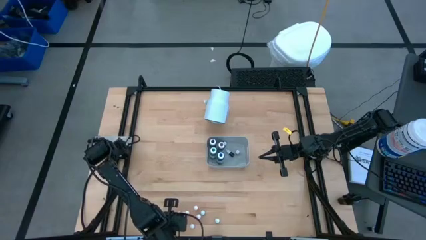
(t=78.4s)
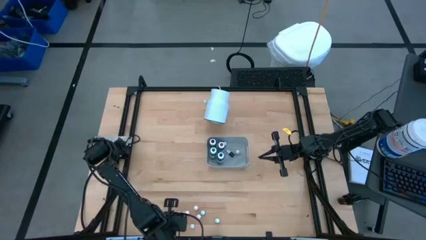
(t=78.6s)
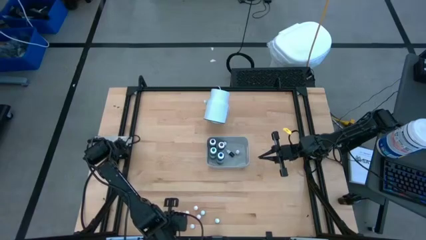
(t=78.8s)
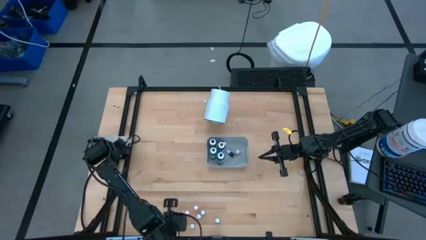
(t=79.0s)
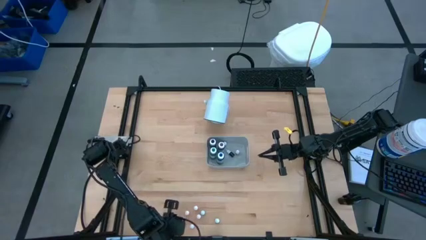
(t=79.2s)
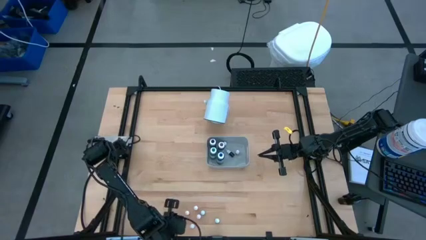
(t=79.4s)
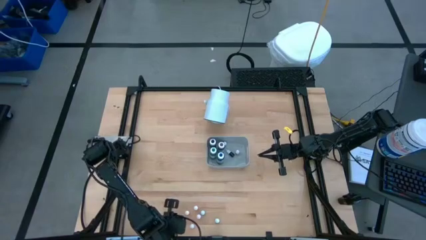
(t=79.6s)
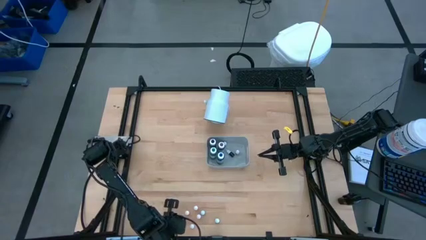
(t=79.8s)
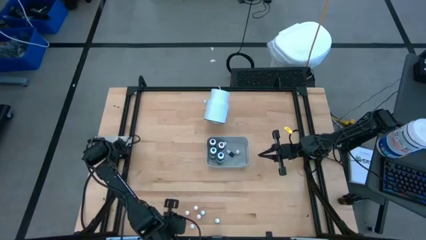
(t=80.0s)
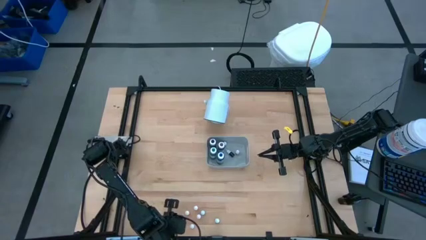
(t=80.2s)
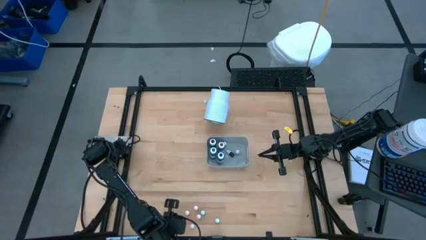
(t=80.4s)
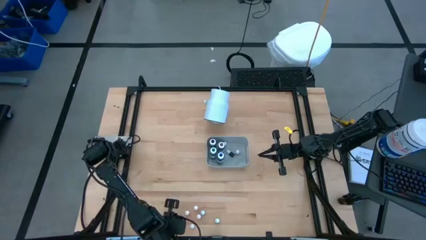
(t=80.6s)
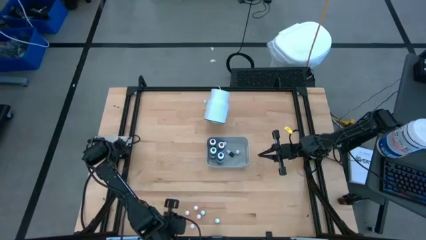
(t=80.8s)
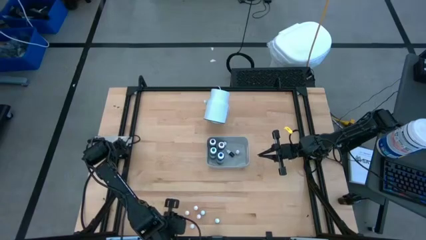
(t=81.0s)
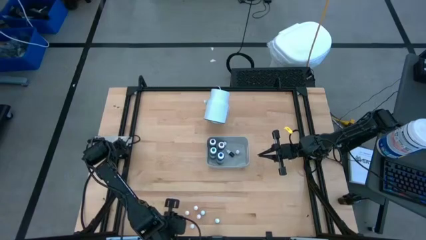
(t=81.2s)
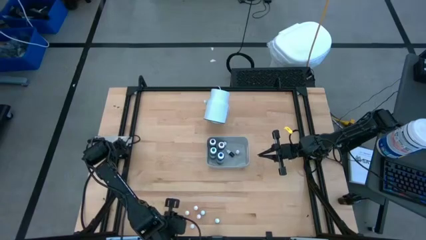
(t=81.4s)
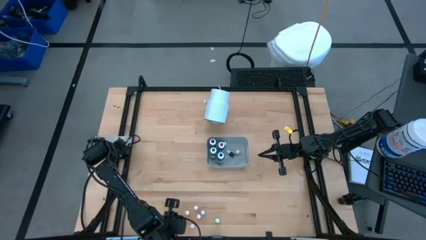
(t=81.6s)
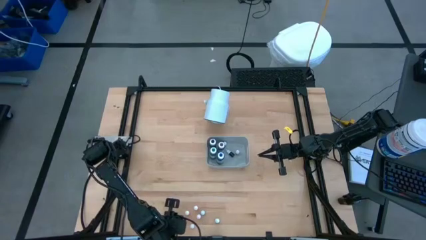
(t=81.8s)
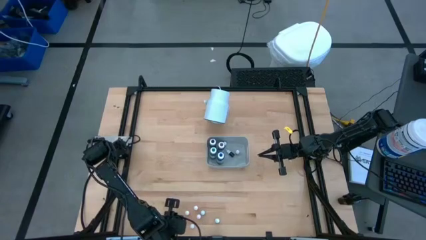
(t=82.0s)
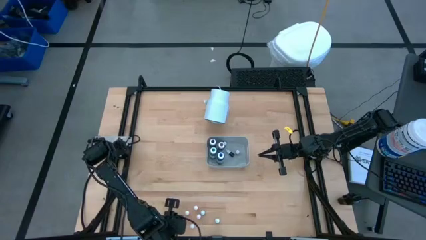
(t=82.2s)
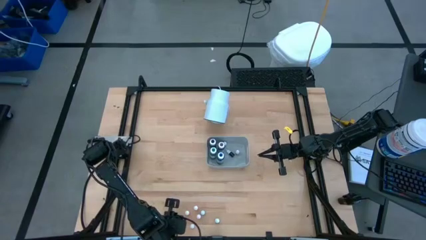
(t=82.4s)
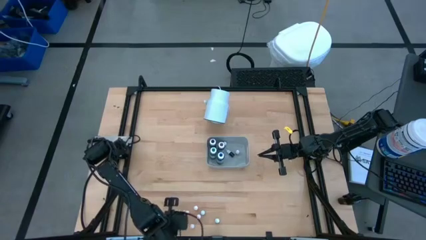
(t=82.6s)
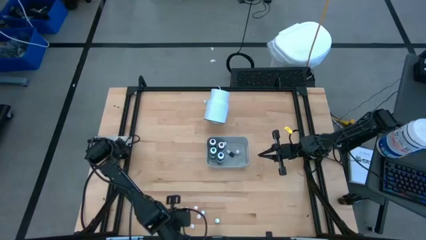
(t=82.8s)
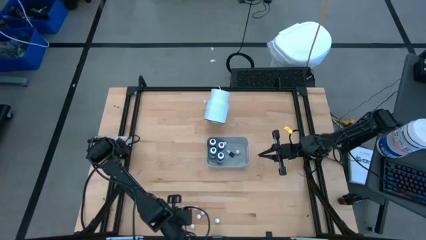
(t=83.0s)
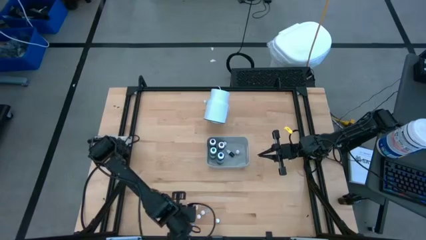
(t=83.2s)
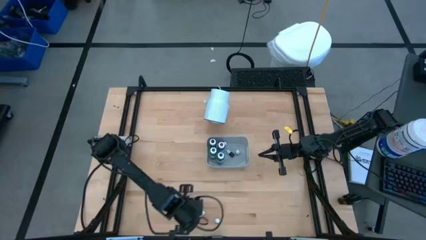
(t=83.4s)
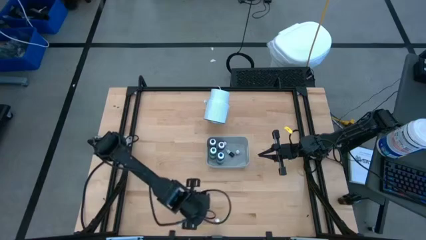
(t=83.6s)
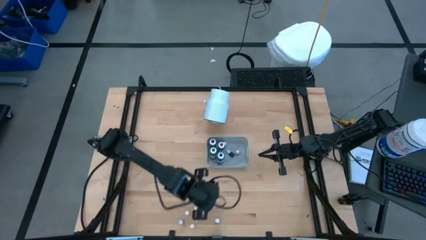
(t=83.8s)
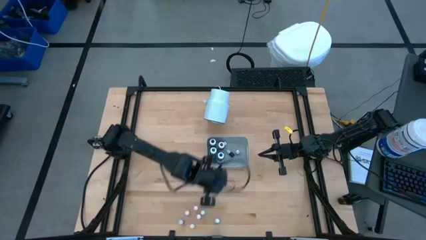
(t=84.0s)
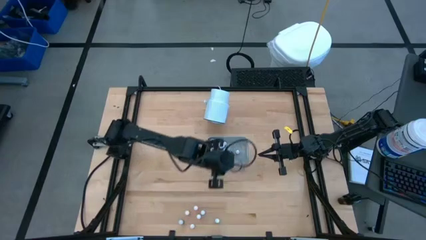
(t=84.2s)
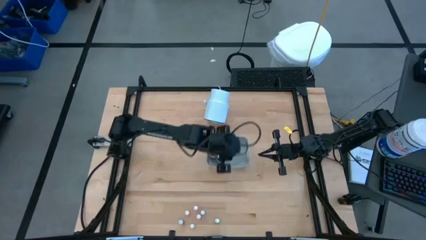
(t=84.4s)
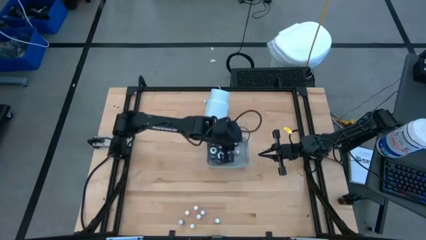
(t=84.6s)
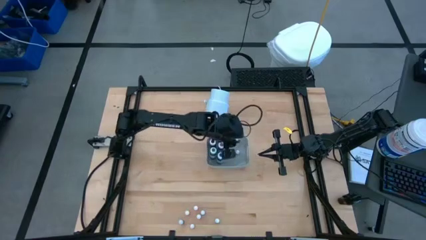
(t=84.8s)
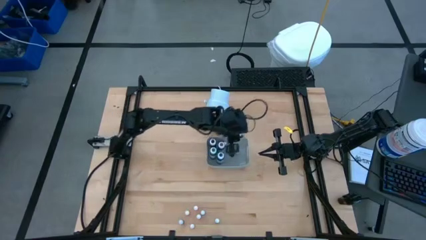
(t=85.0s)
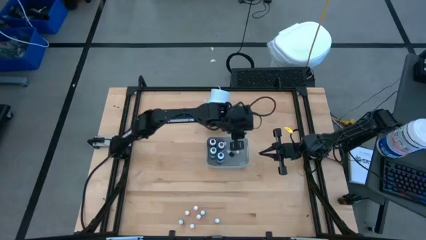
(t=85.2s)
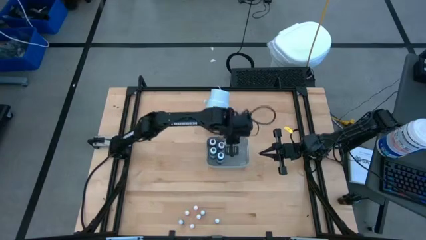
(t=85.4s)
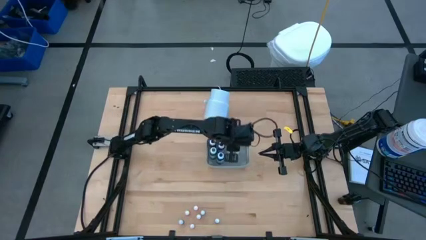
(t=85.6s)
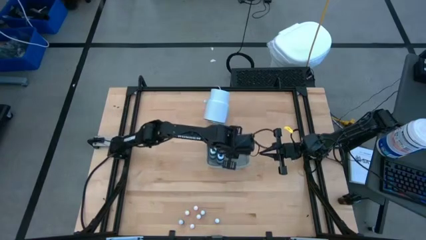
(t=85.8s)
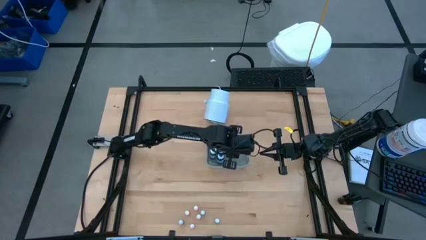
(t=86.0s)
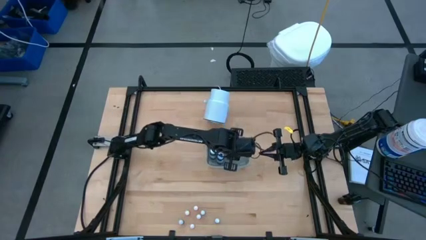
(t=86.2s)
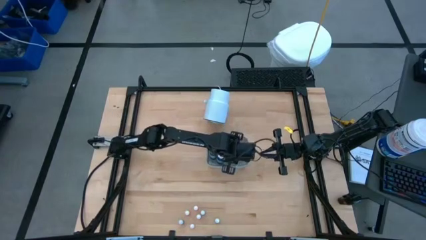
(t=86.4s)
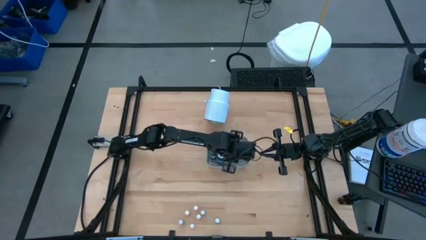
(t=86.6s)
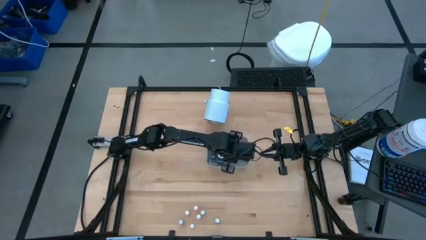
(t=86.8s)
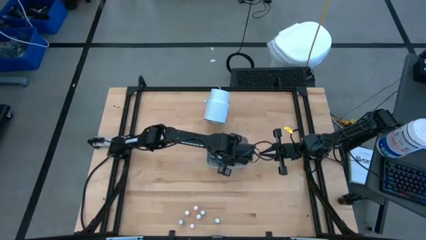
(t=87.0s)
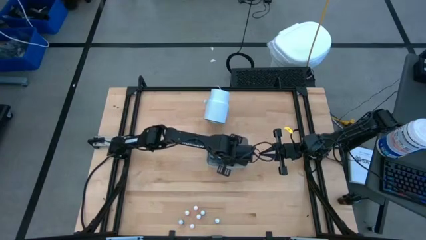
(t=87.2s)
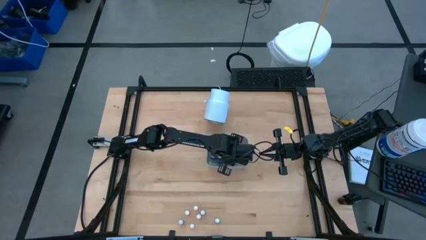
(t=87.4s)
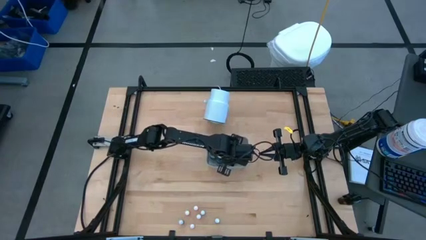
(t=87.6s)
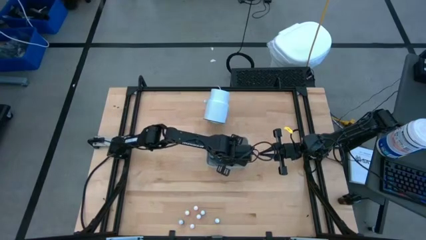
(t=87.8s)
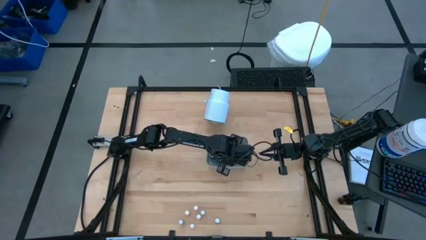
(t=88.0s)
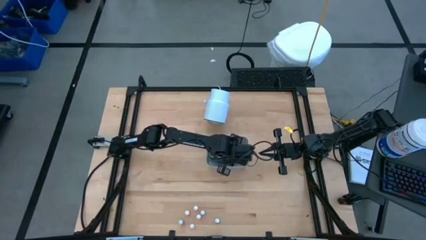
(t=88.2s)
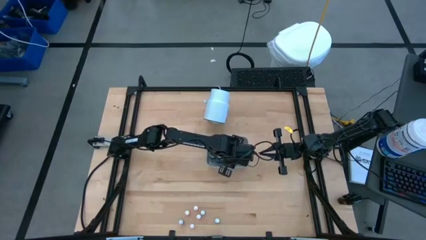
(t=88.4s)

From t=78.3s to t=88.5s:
Task: Pick & Place food coloring
Put the small blue food coloring bottle into the gray bin

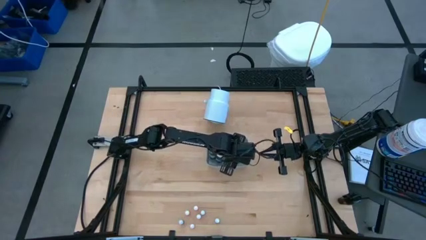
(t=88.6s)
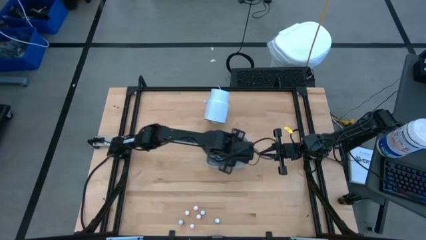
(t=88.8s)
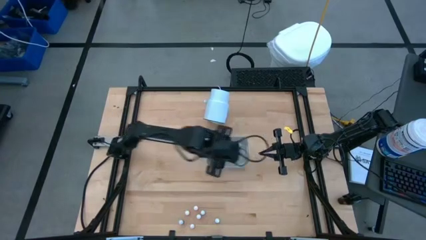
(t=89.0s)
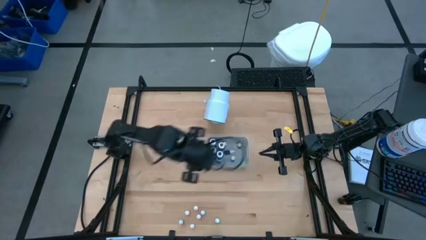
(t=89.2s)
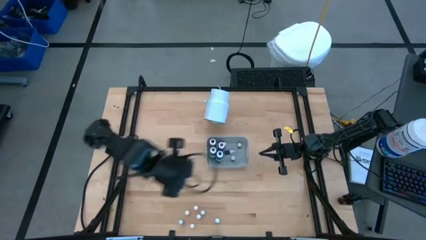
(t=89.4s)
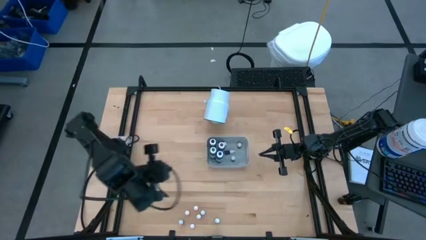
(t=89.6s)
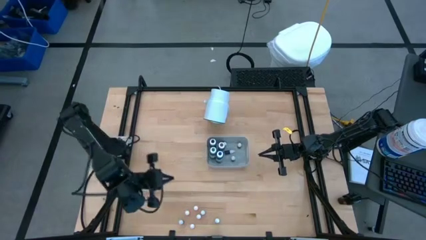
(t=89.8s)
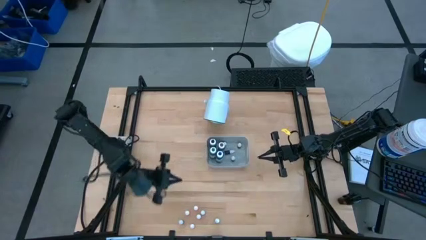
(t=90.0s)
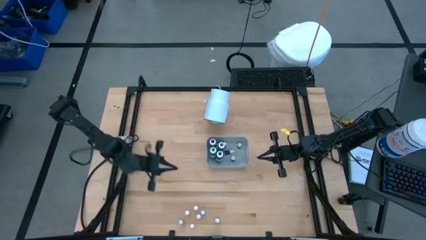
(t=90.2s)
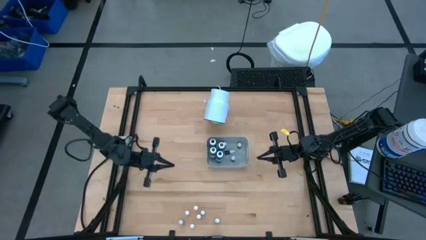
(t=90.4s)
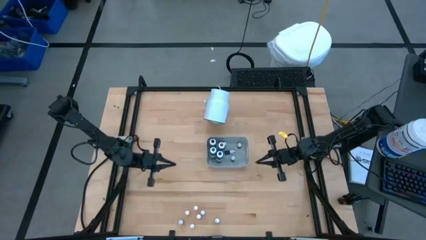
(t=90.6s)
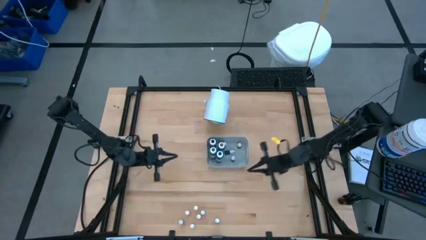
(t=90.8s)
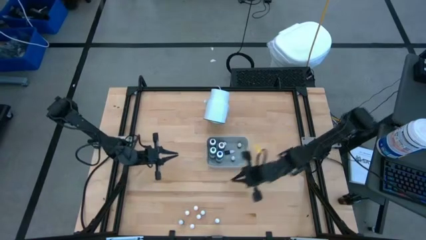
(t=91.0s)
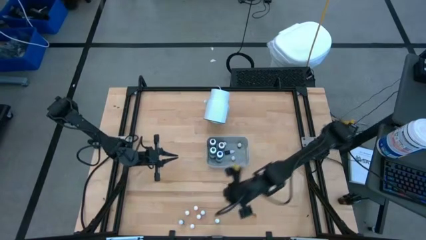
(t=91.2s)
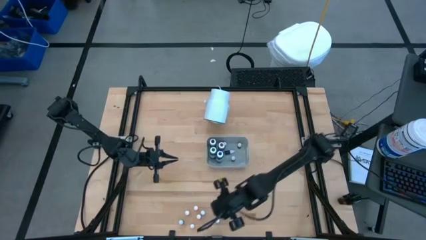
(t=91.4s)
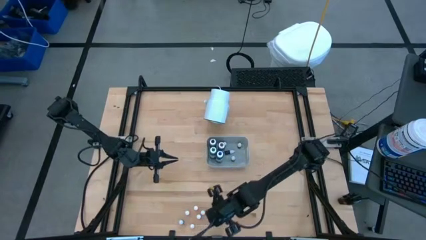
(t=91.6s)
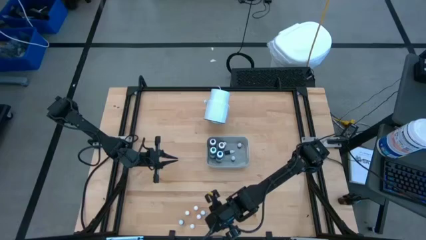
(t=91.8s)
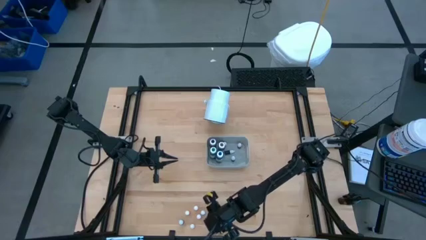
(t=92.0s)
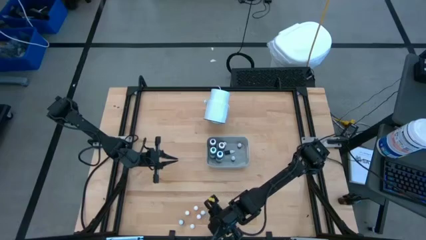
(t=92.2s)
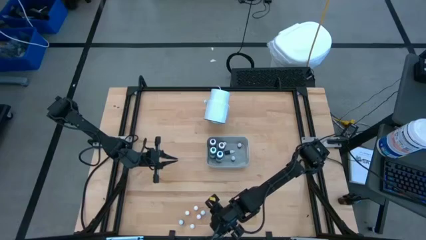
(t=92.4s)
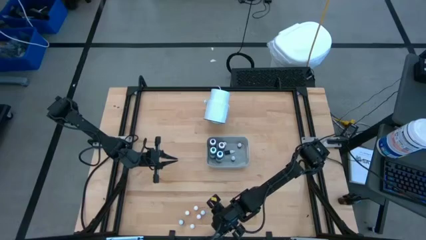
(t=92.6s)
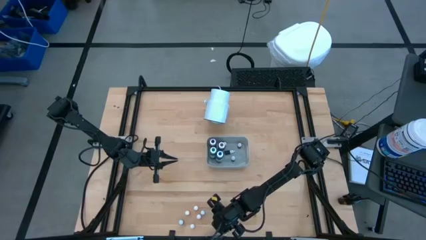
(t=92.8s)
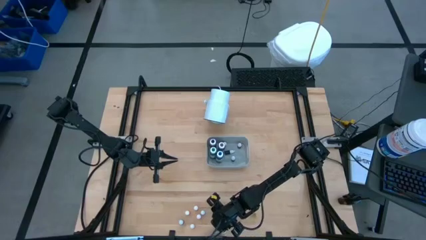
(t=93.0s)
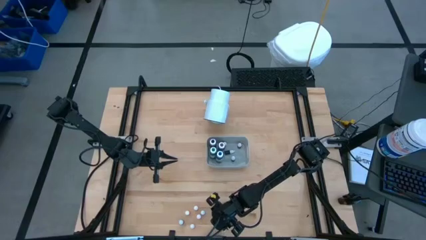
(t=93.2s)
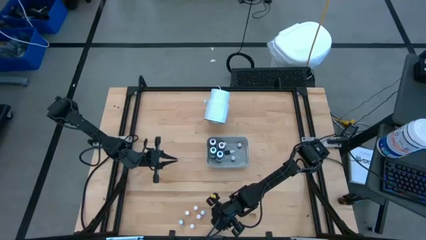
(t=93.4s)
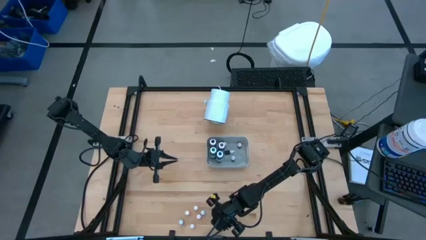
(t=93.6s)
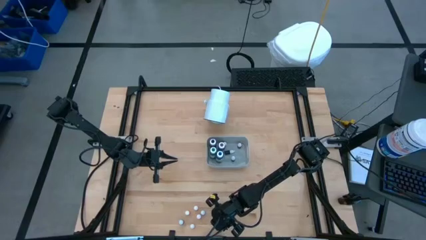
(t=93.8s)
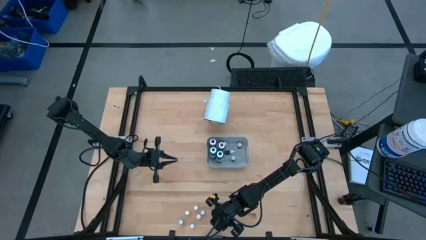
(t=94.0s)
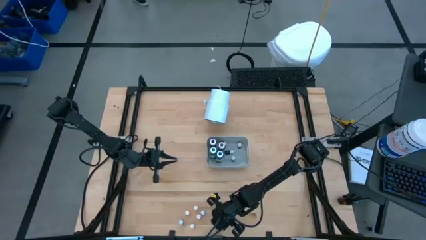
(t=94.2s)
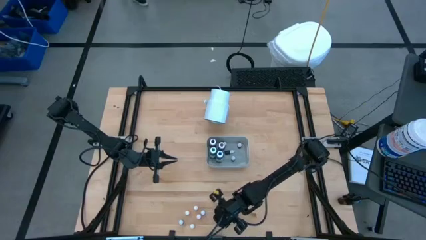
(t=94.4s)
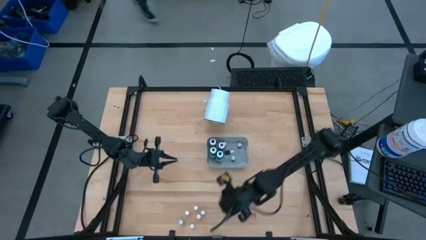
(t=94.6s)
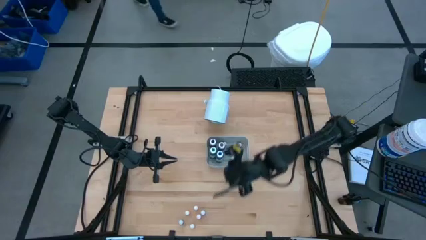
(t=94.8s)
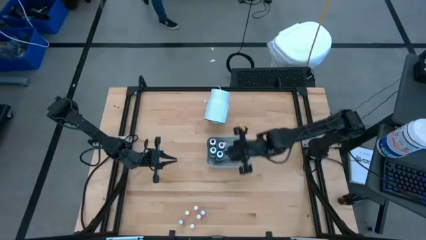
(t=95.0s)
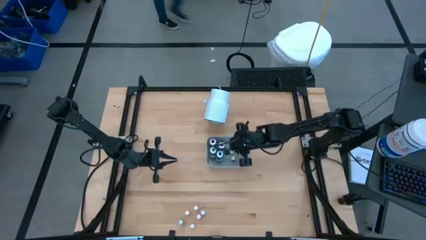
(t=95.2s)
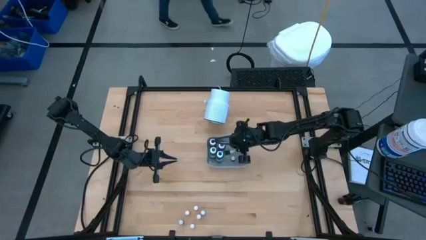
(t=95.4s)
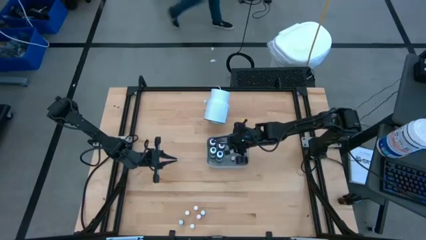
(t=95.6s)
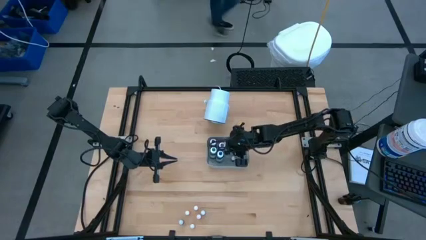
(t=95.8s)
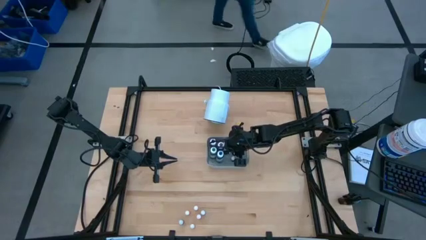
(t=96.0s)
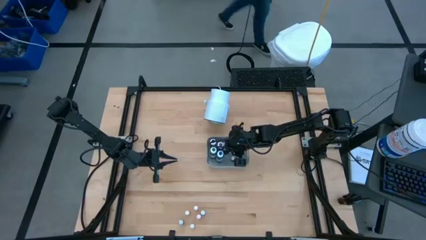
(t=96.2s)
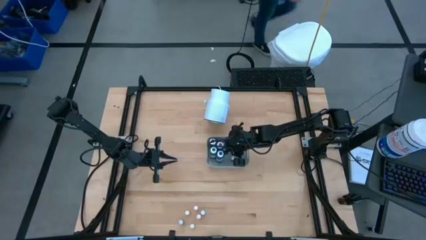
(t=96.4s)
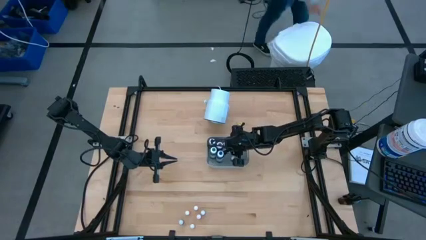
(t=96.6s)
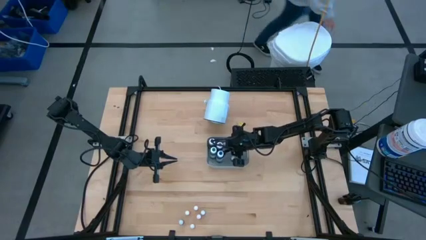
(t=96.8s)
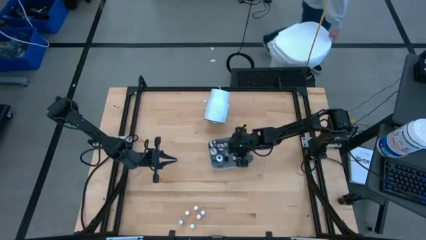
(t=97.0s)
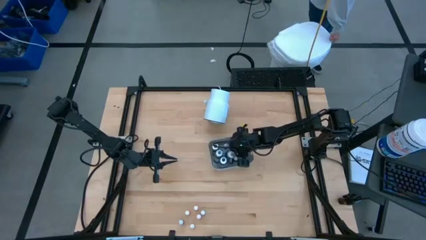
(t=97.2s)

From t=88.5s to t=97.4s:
Put the small black food coloring bottle into the gray bin
